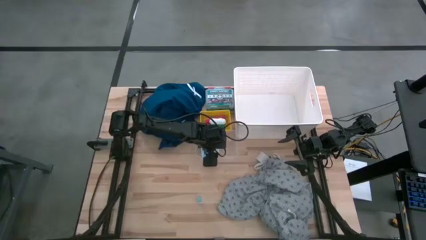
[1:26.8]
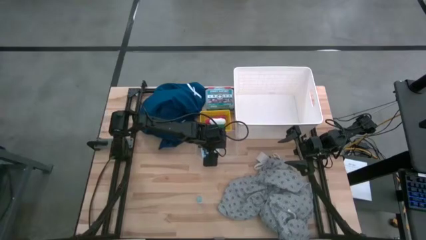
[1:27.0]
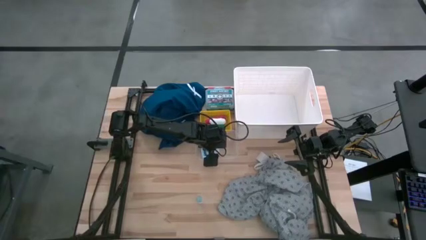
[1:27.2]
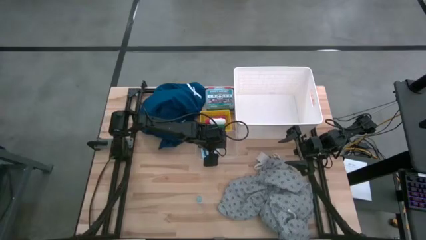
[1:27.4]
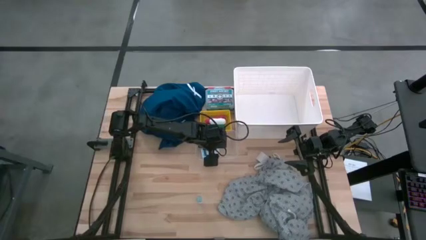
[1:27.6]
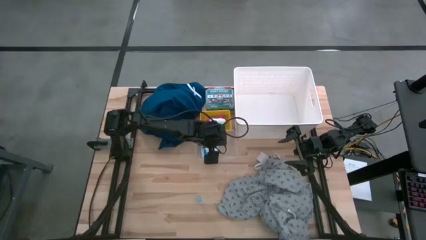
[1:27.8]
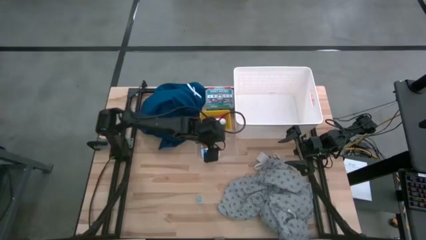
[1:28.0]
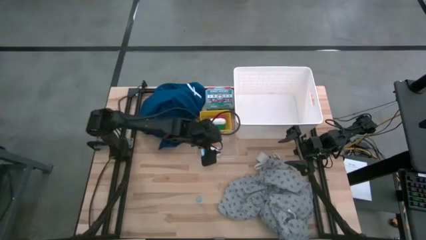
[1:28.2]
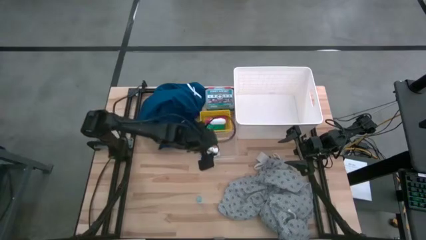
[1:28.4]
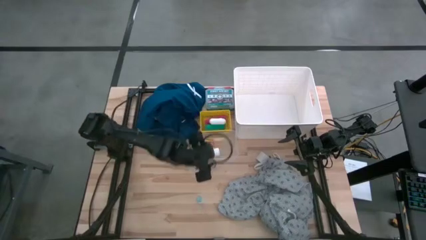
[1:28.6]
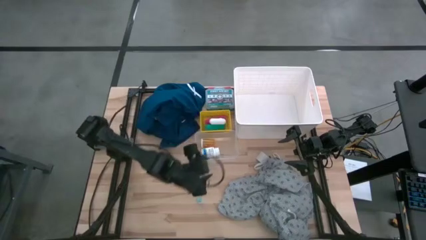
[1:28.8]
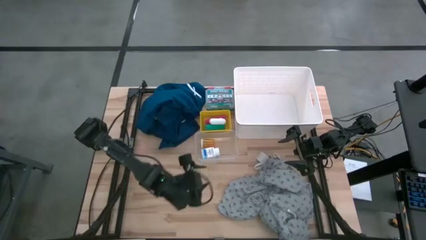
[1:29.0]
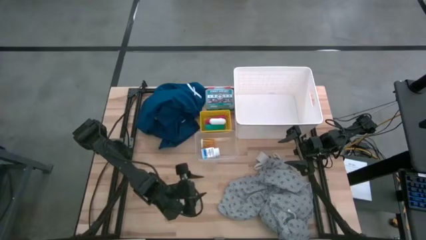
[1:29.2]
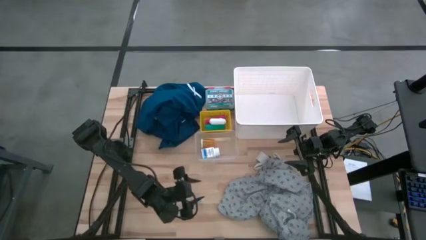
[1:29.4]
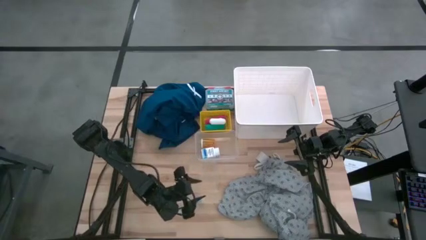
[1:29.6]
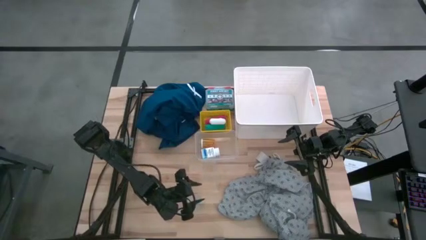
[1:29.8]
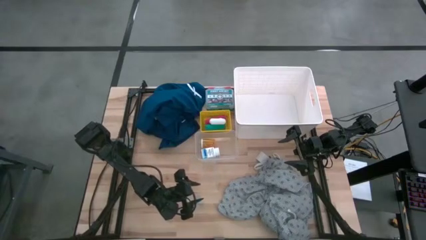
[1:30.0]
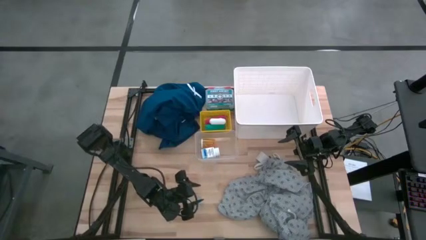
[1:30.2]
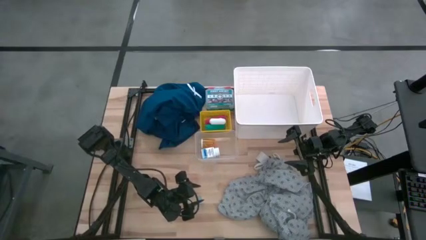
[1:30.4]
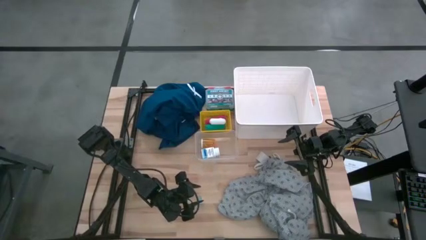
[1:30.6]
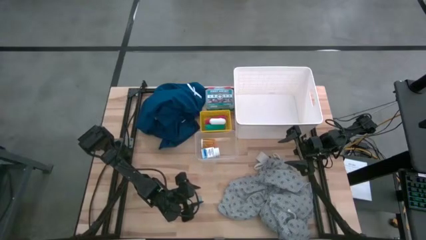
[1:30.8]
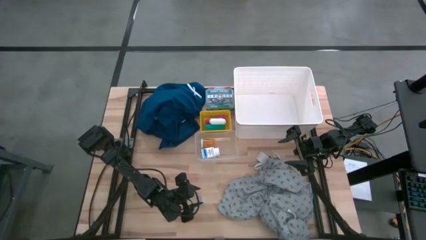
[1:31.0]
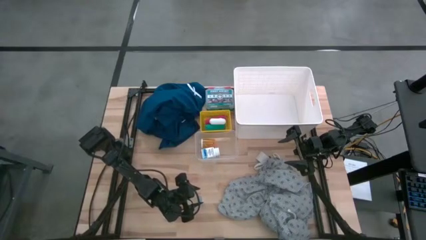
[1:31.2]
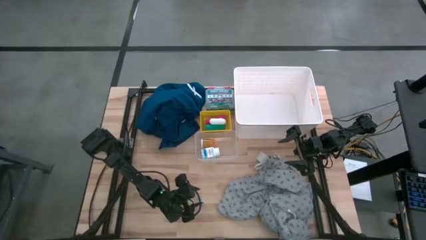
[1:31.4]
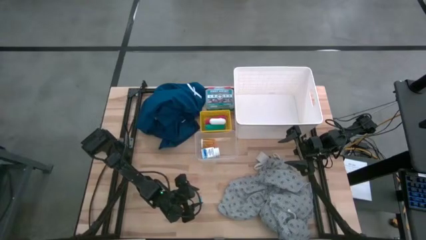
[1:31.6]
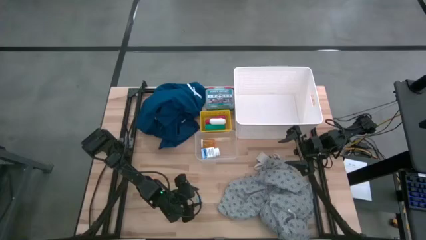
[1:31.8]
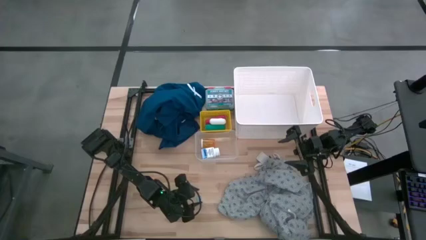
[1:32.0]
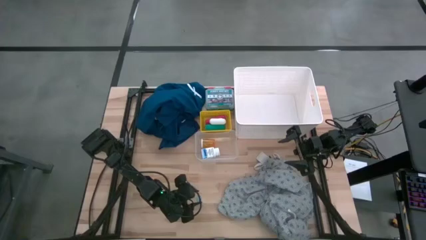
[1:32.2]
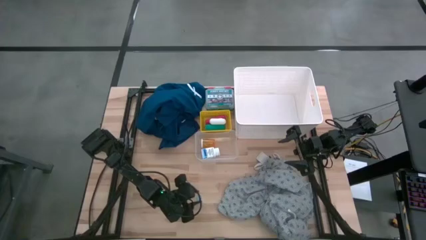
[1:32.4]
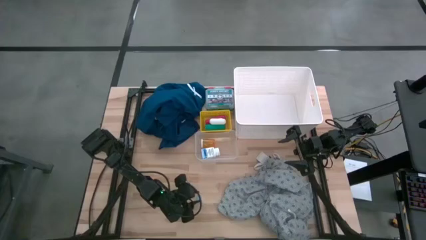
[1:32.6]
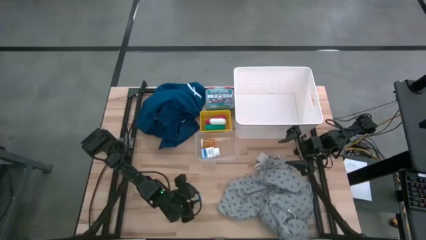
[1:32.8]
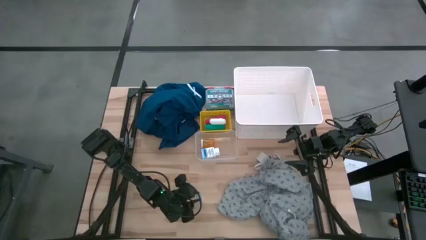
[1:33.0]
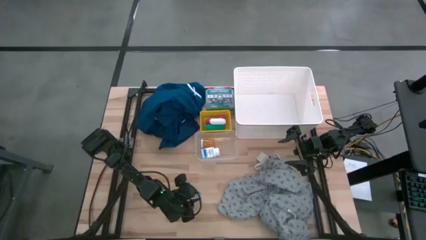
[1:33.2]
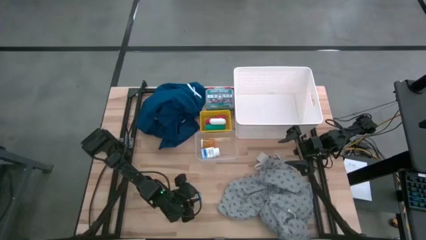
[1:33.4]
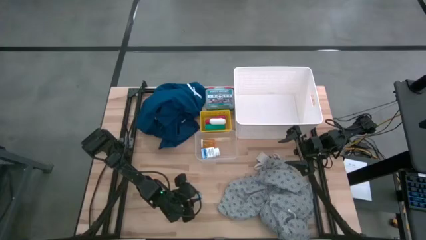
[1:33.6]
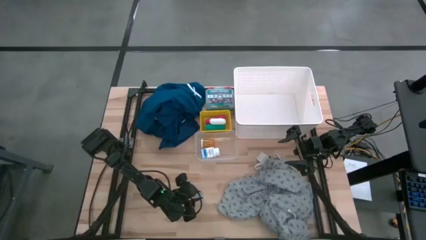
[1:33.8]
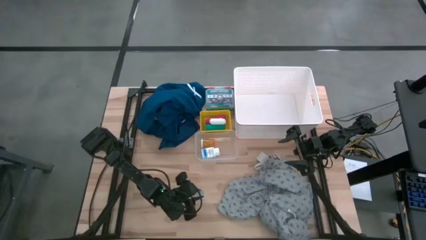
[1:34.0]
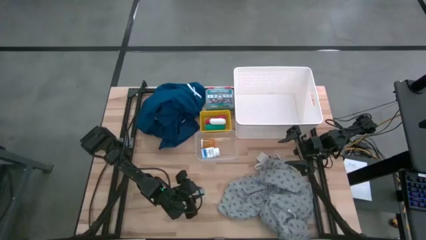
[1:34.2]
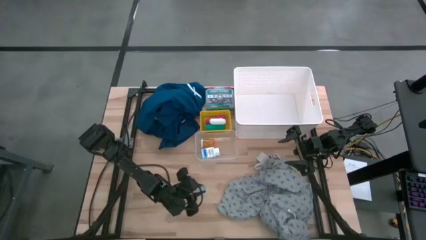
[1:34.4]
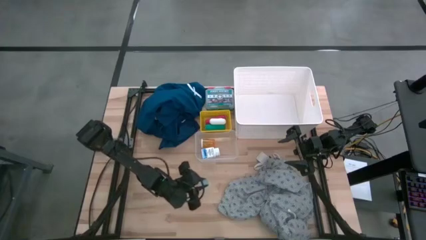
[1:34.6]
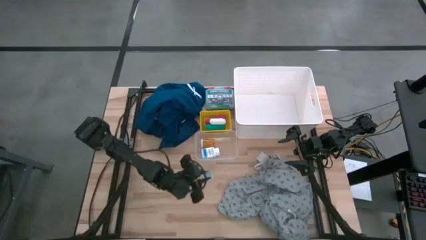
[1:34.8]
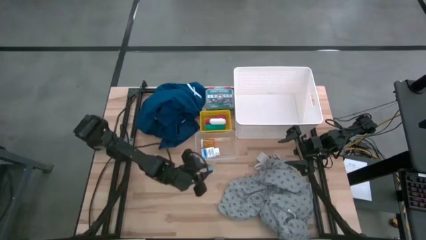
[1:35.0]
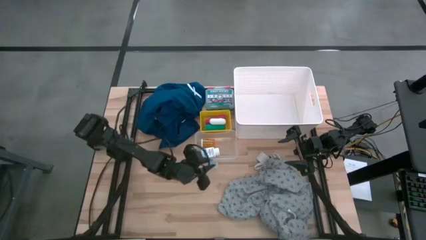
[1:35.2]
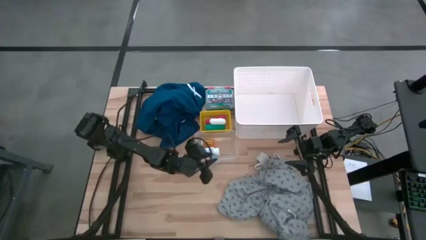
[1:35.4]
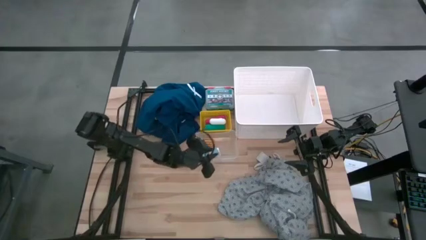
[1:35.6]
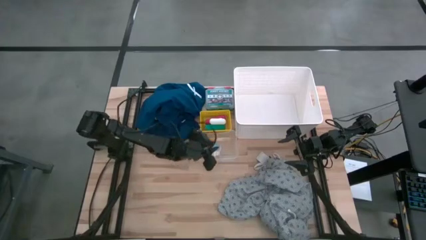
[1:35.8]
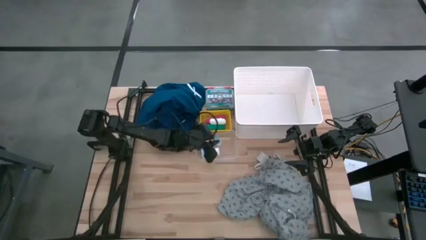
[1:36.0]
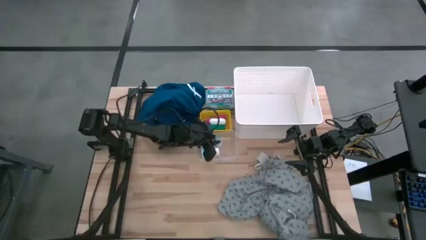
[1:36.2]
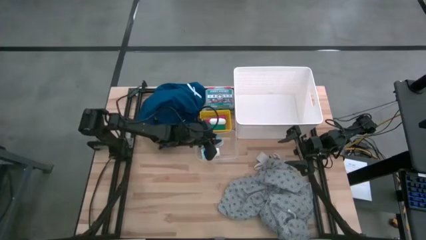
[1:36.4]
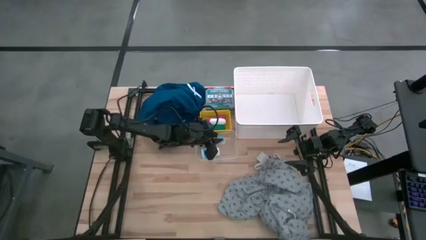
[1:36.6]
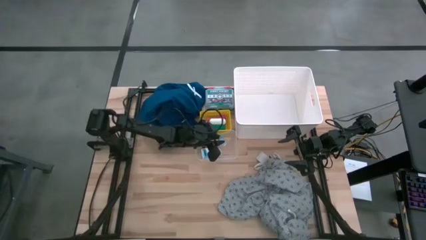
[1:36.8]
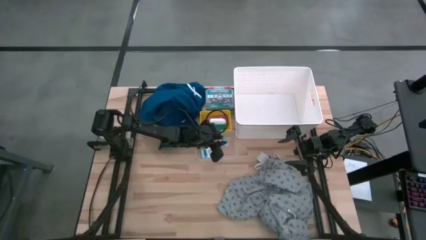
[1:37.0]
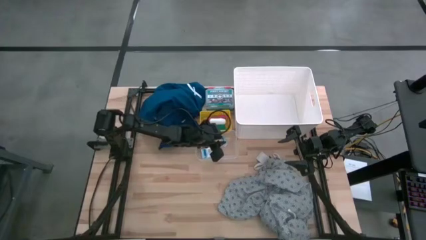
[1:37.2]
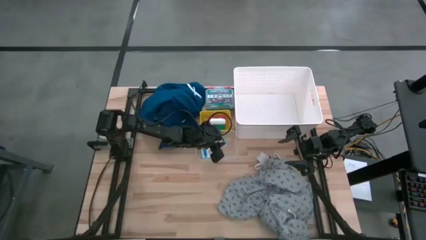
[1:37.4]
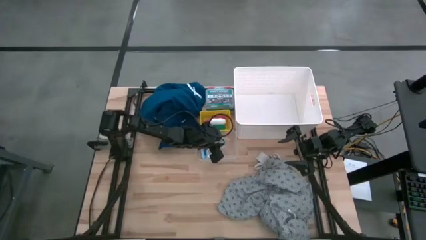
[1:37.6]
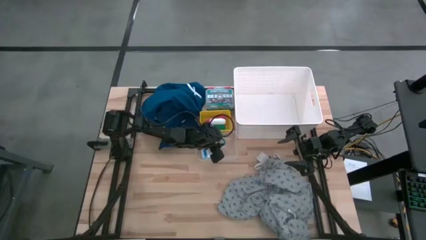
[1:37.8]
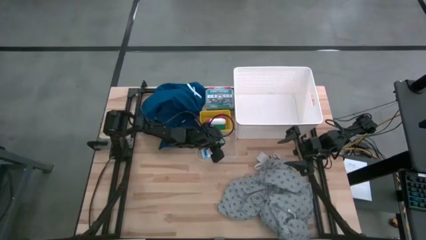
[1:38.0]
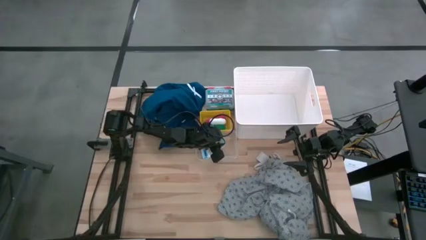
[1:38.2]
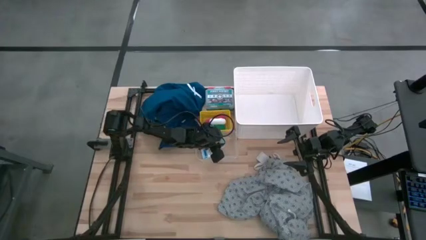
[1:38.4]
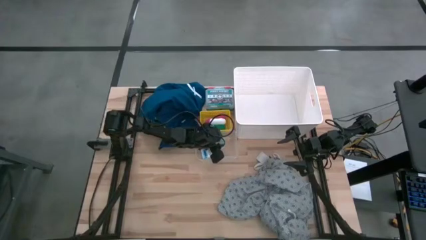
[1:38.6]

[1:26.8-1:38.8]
Task: Pick & Place Medicine items
Put the blue medicine bottle into the transparent bin
